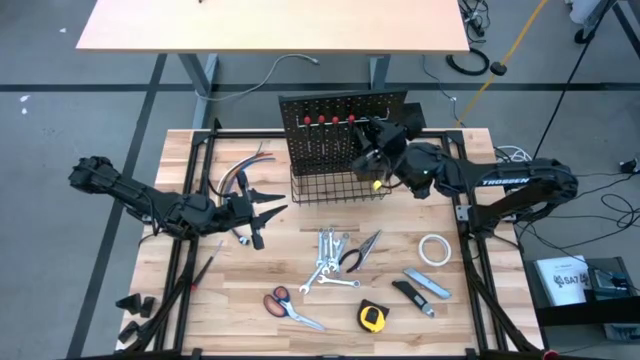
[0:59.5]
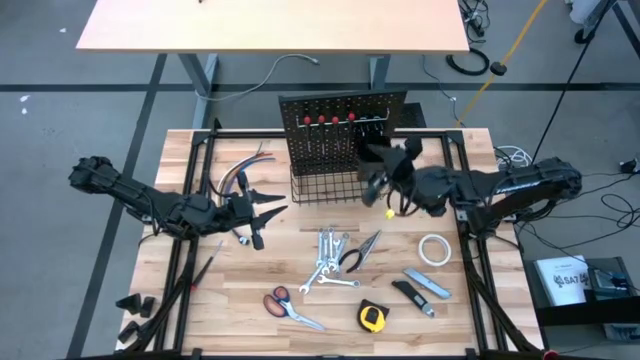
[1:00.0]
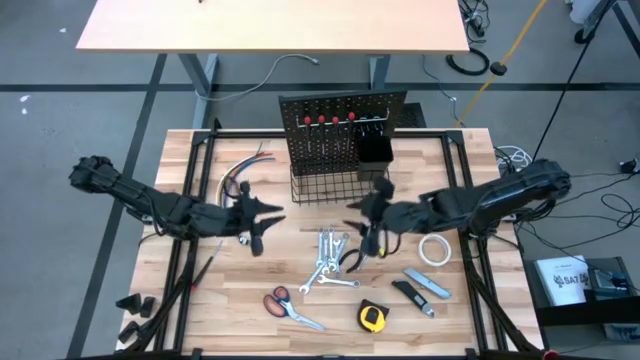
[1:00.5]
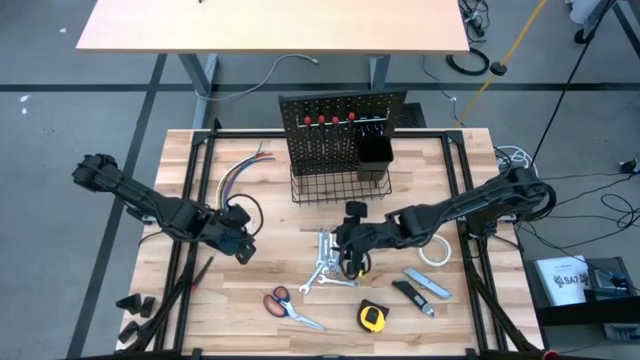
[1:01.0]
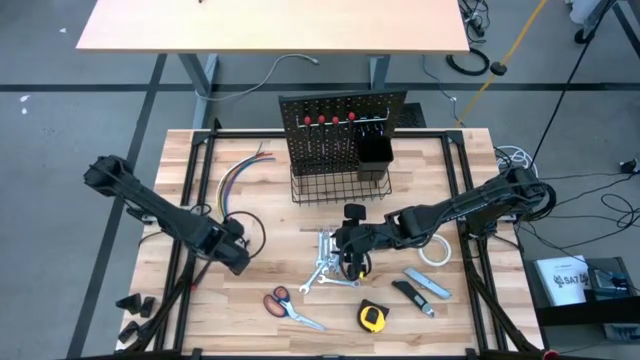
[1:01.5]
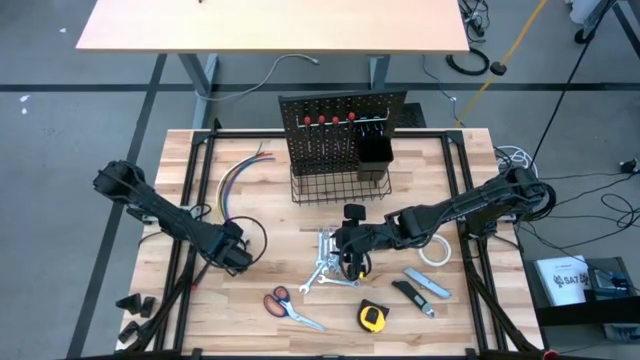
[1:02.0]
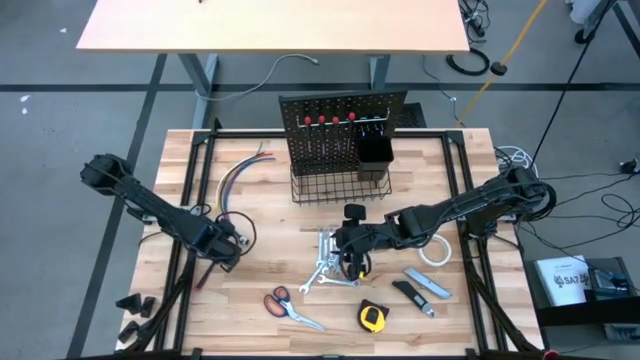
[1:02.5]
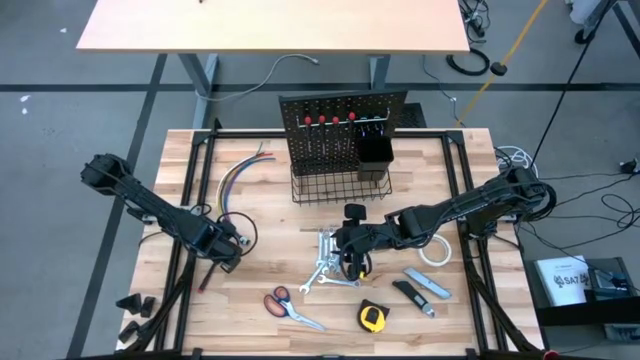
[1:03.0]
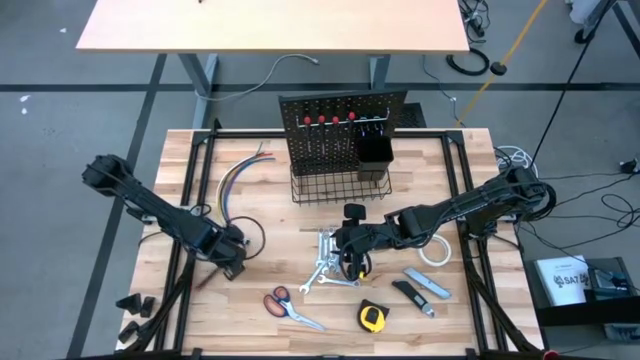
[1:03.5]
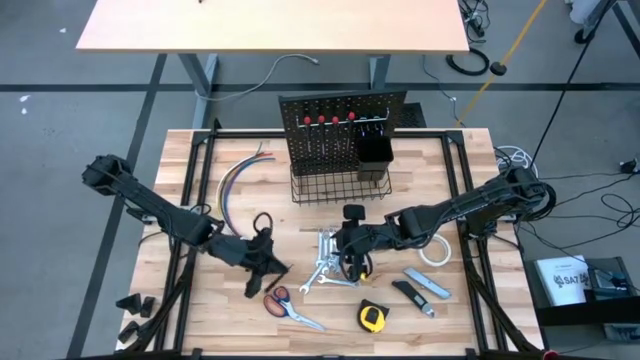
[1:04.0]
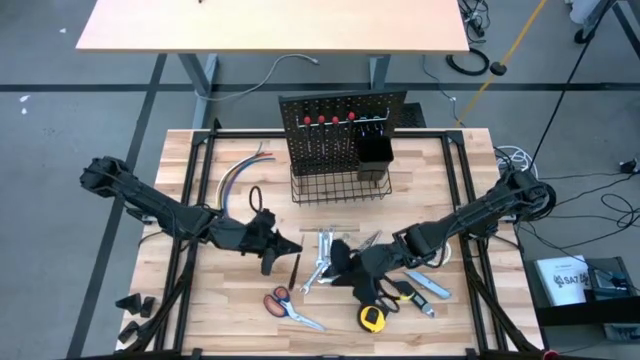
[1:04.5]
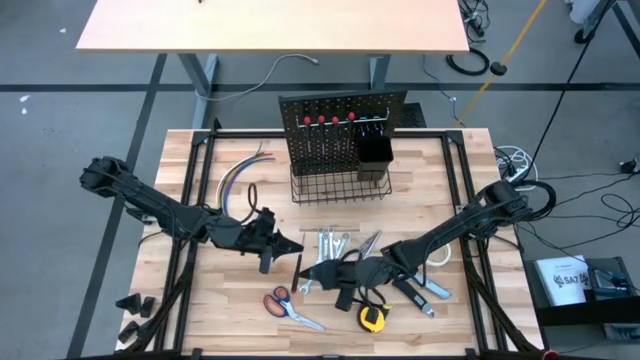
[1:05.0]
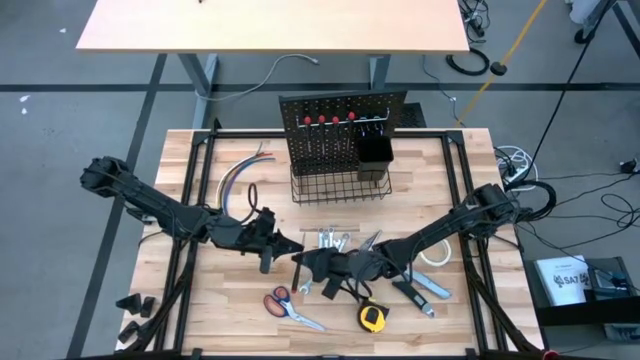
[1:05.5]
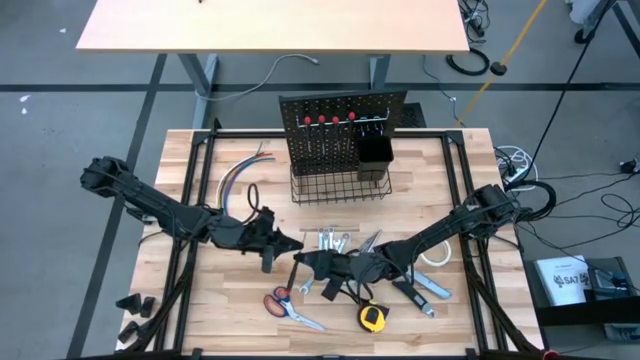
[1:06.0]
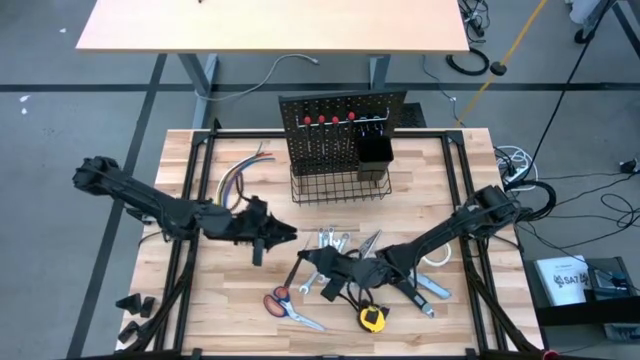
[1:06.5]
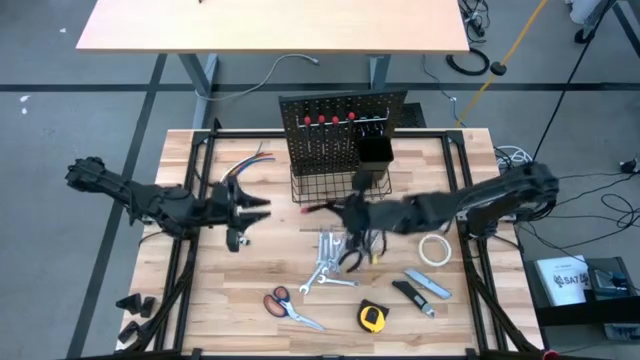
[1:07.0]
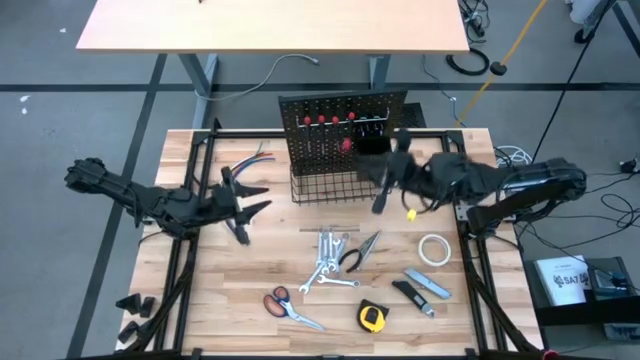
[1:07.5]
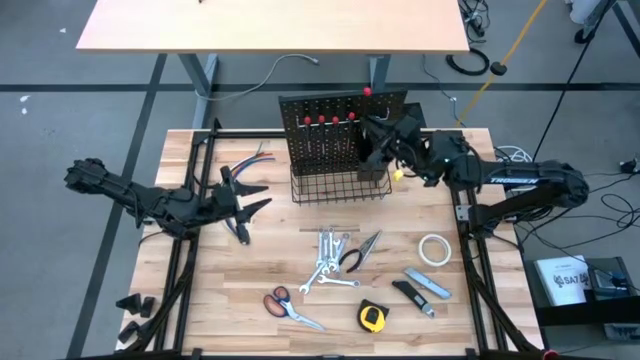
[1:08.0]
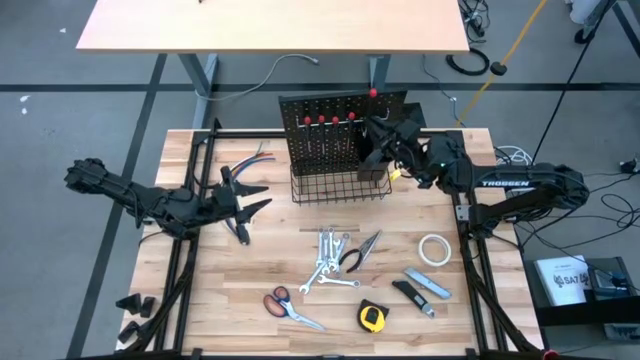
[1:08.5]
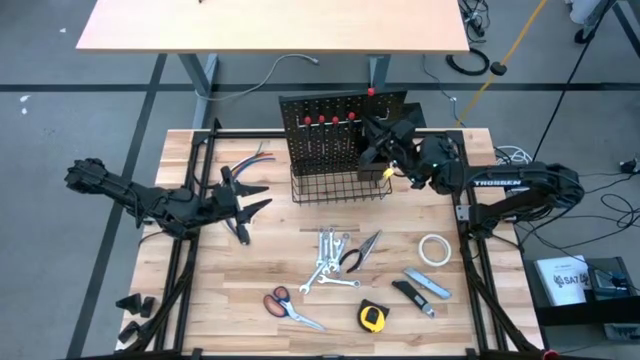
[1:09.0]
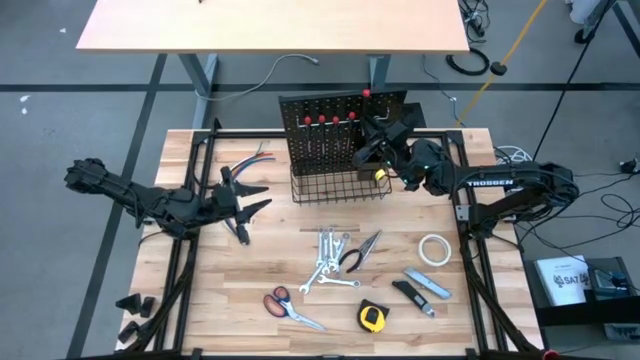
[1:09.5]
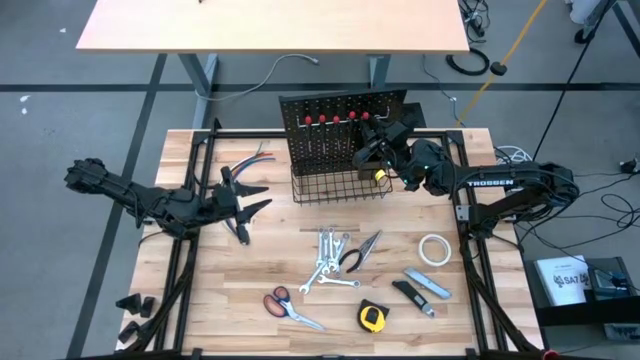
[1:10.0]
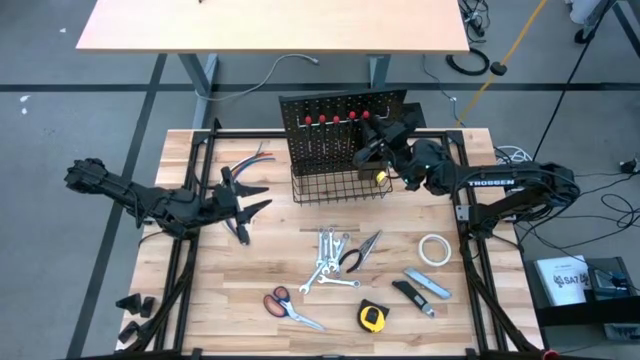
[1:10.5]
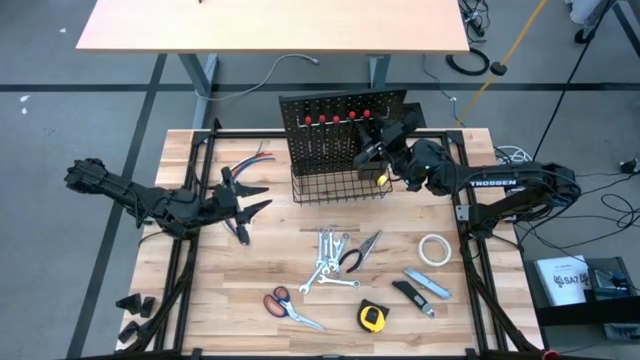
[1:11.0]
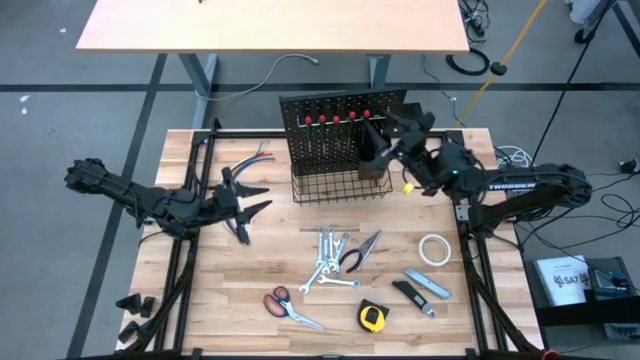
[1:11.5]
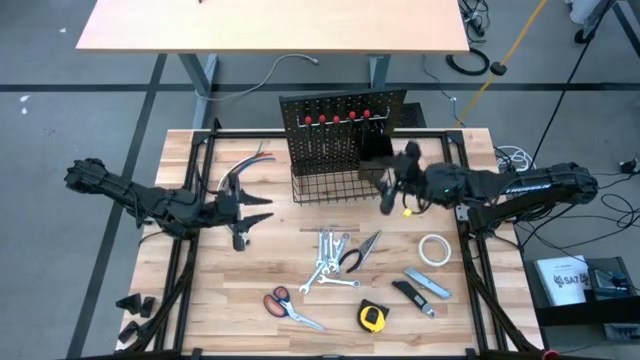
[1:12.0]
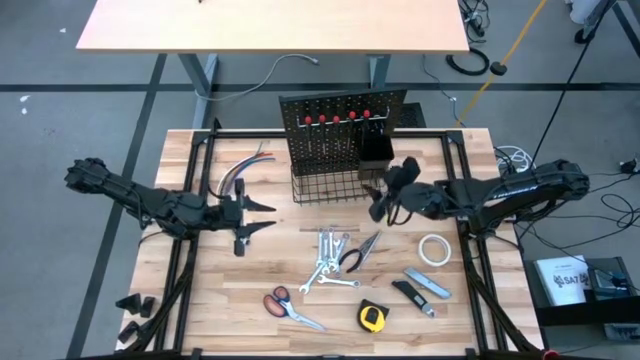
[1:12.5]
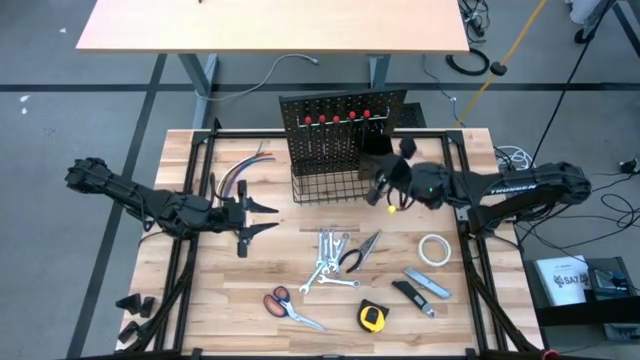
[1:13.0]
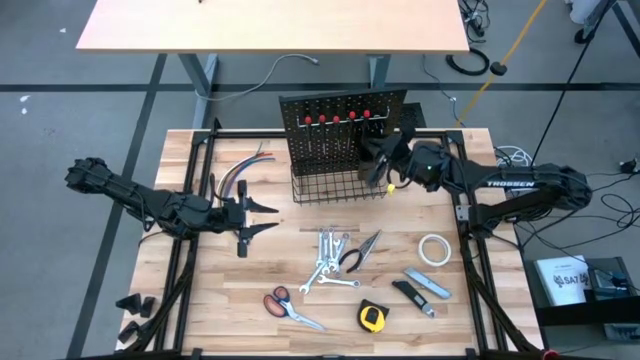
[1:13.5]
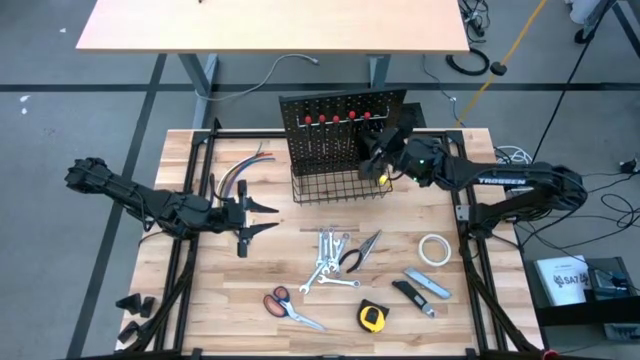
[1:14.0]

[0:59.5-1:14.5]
Task: Hang tools onto peg board
Hang the nut driver on the pegboard

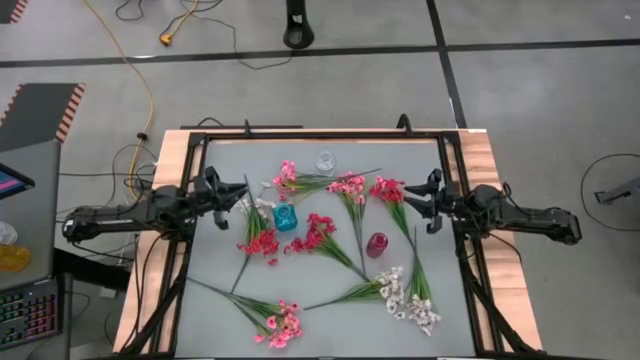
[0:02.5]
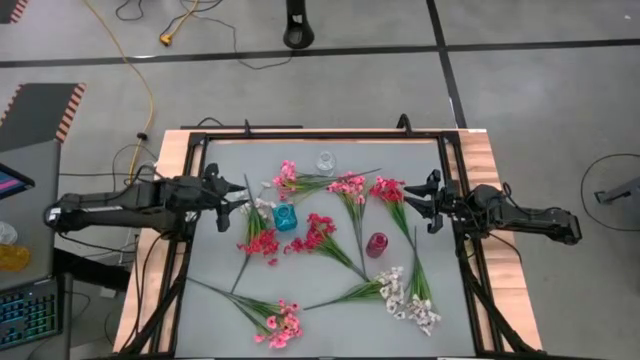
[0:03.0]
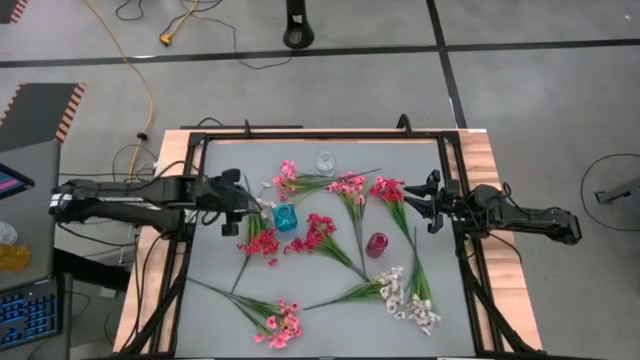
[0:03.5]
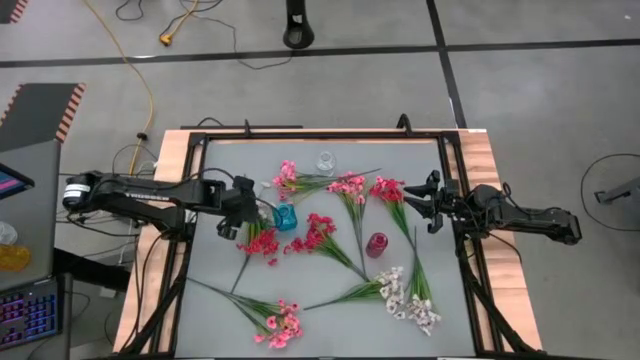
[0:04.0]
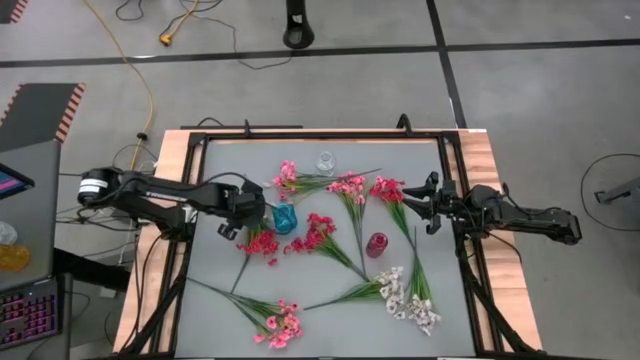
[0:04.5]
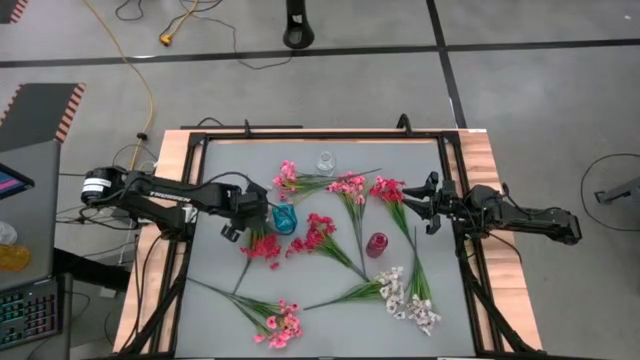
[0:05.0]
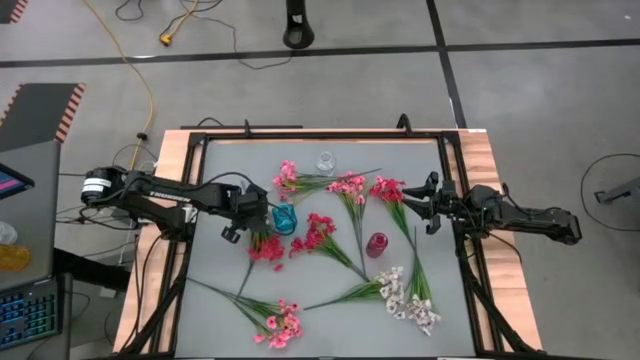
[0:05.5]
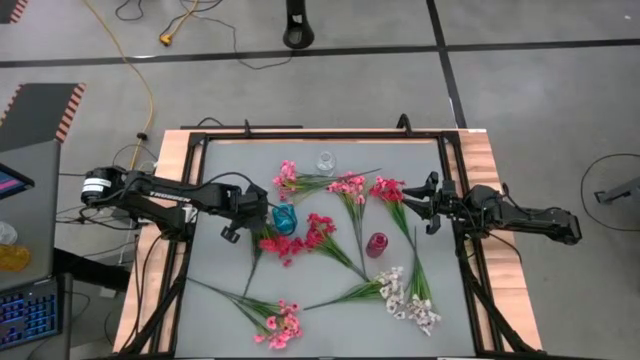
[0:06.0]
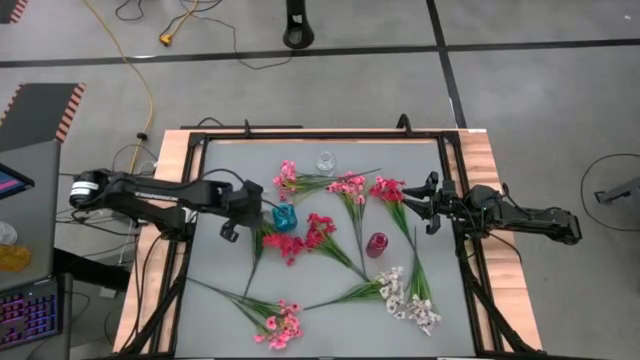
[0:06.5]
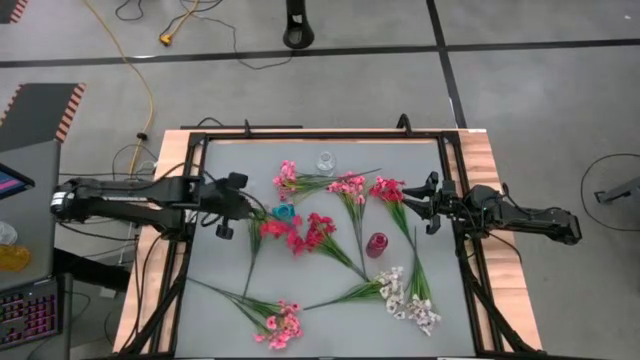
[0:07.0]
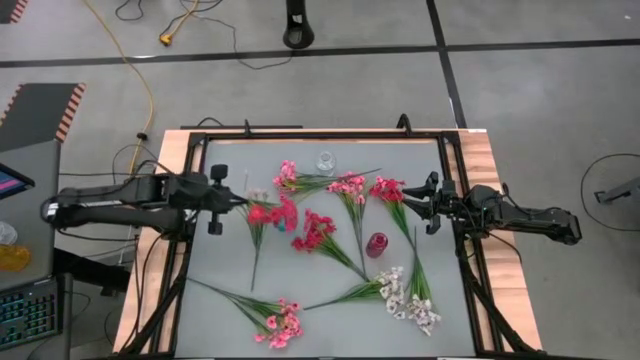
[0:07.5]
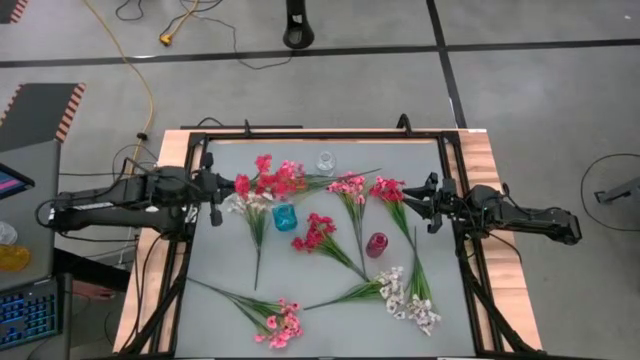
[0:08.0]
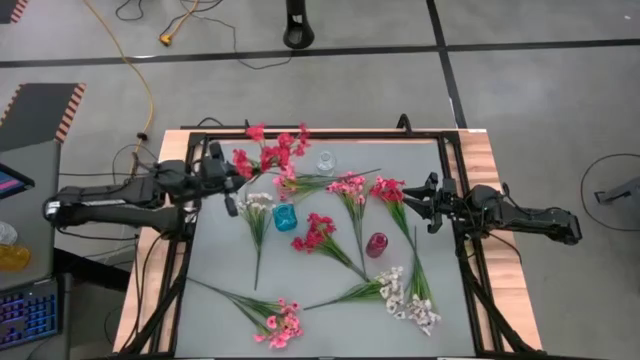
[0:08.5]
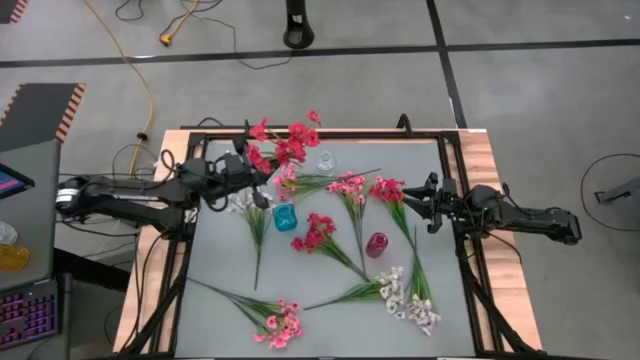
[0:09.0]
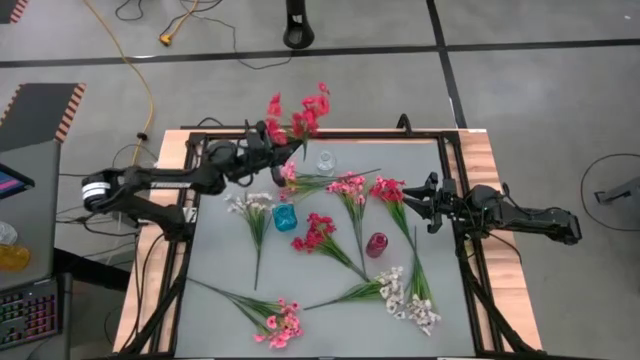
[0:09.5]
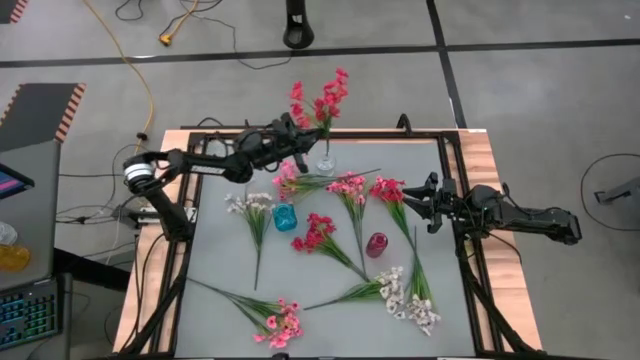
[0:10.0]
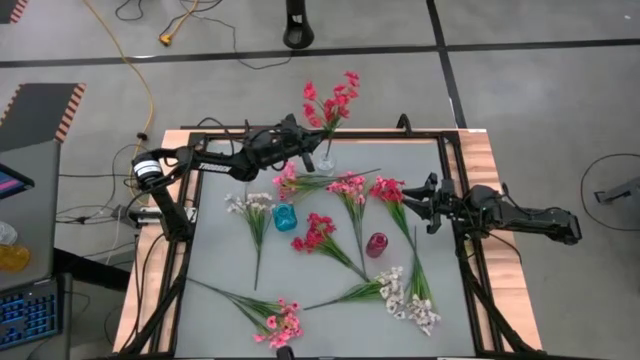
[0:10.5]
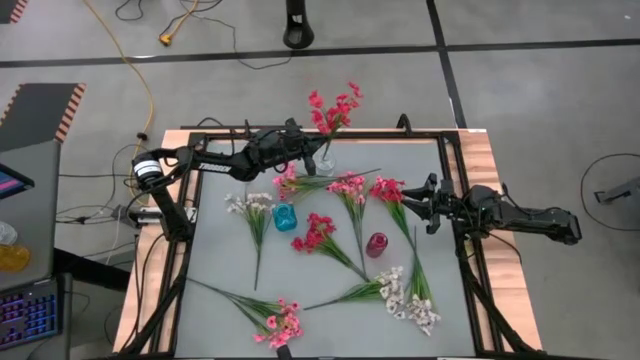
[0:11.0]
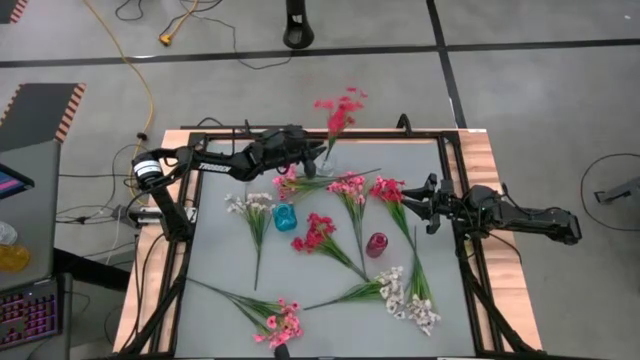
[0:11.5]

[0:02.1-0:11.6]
Task: Sort flowers into vase by color
Put the left red flower into the transparent vase
